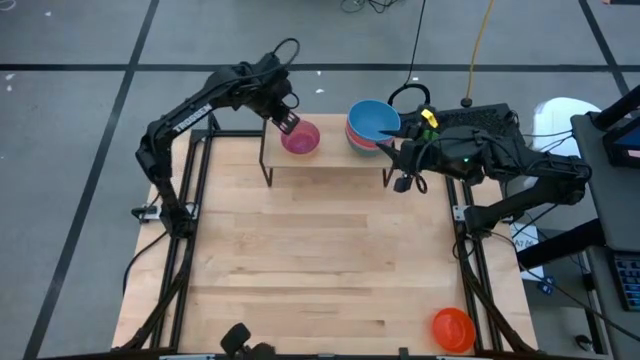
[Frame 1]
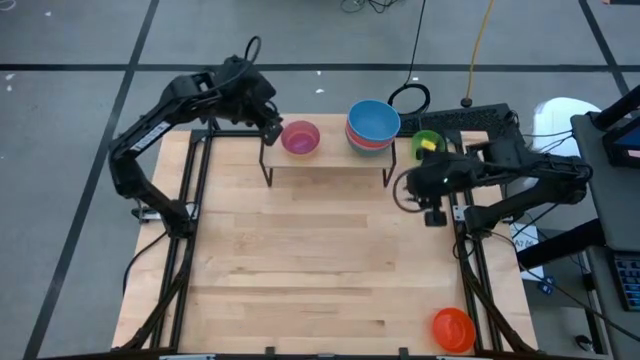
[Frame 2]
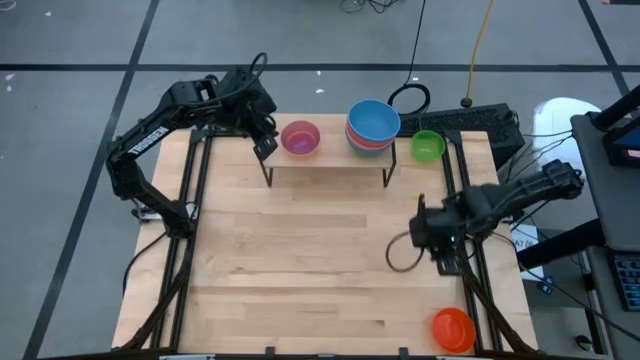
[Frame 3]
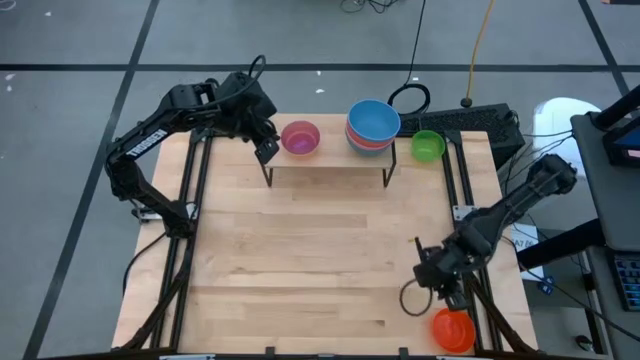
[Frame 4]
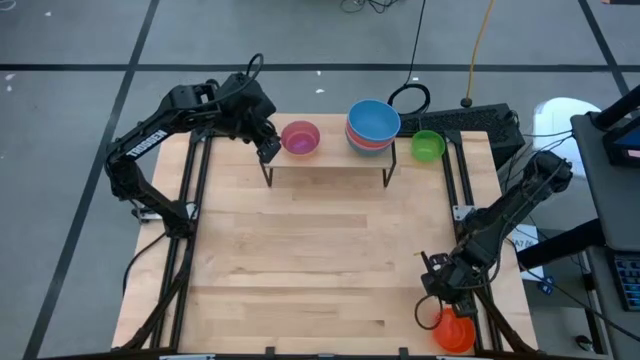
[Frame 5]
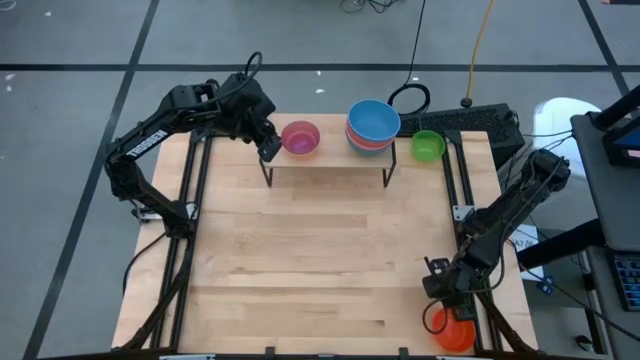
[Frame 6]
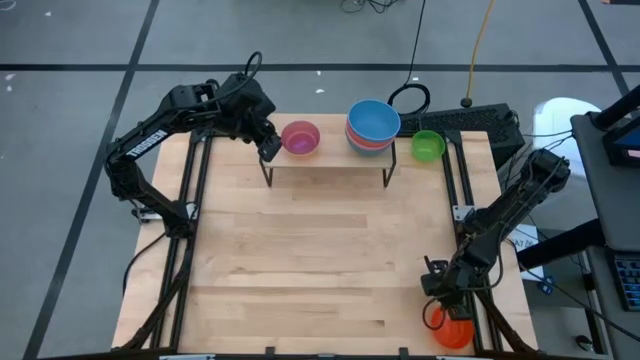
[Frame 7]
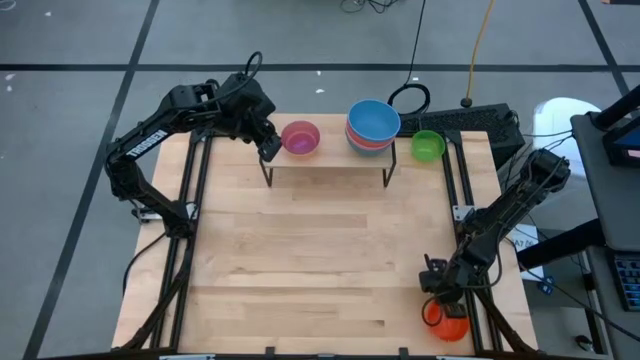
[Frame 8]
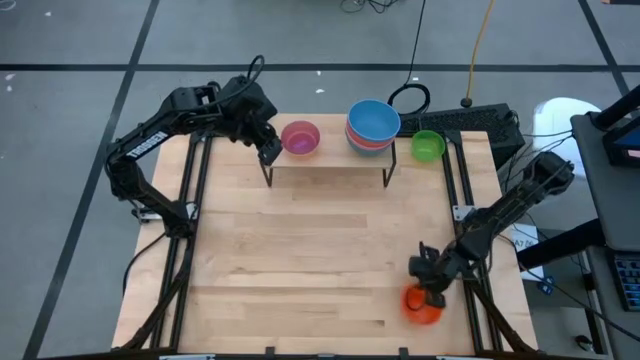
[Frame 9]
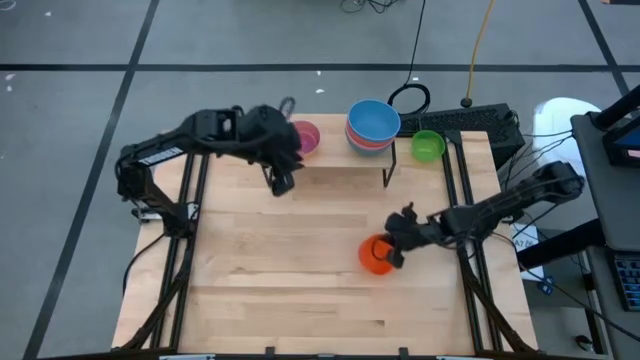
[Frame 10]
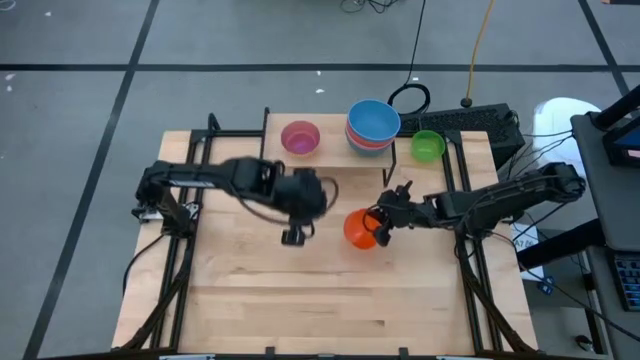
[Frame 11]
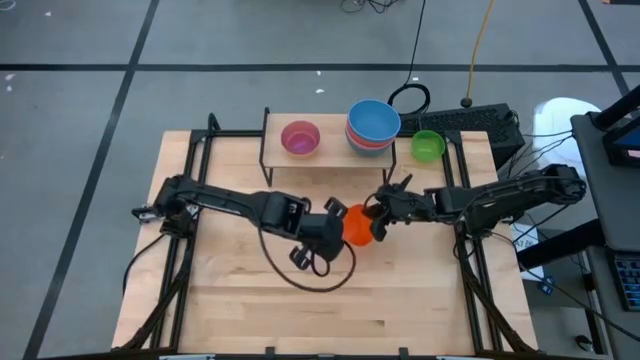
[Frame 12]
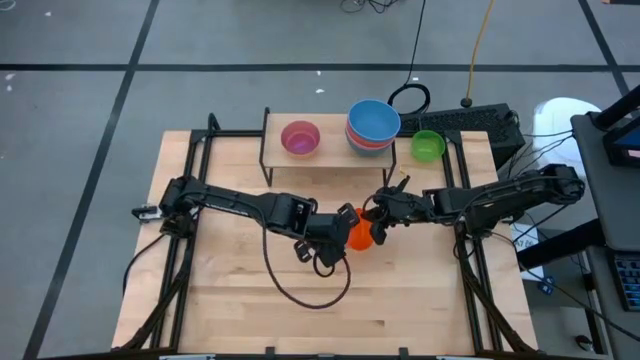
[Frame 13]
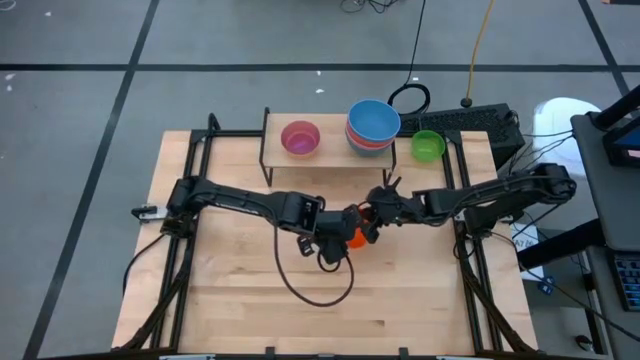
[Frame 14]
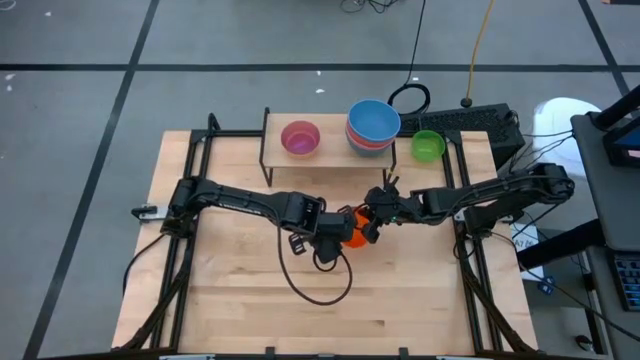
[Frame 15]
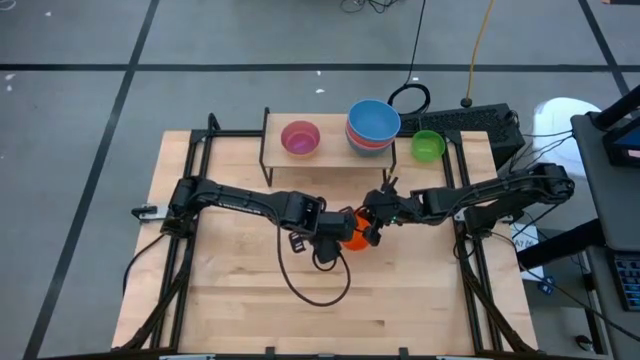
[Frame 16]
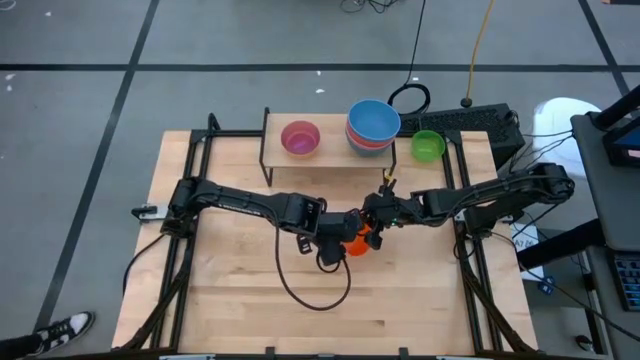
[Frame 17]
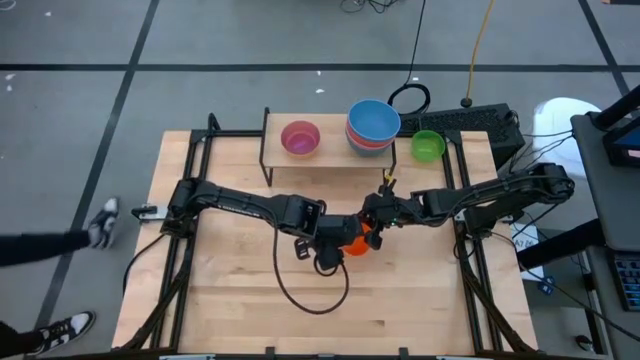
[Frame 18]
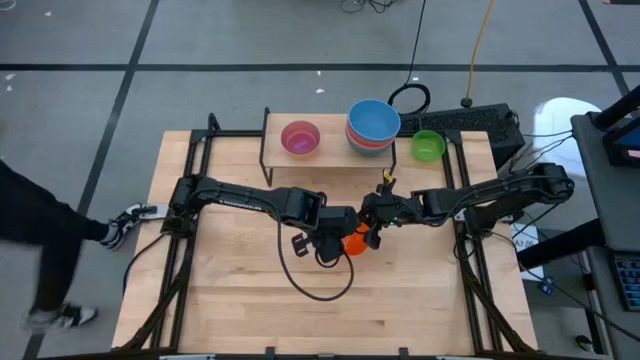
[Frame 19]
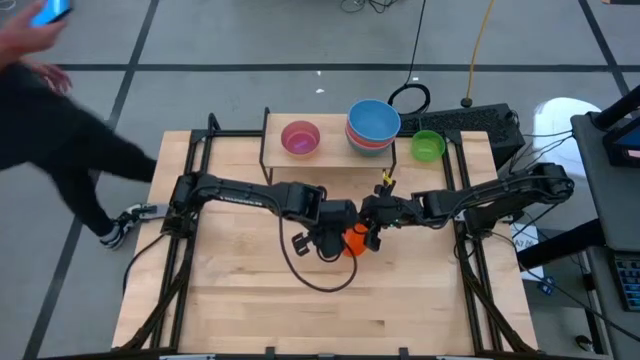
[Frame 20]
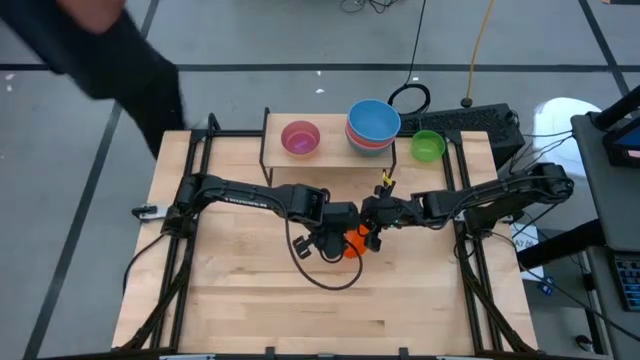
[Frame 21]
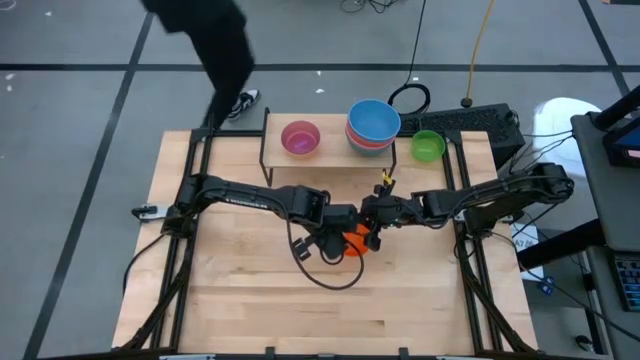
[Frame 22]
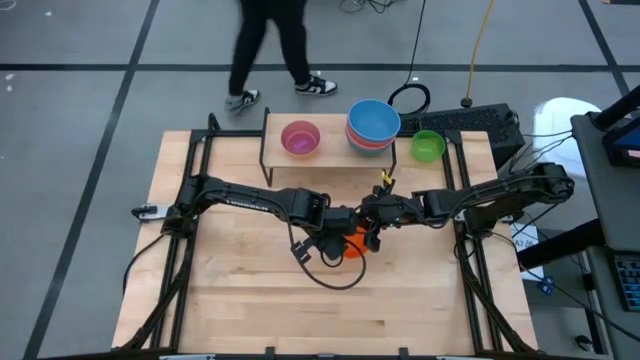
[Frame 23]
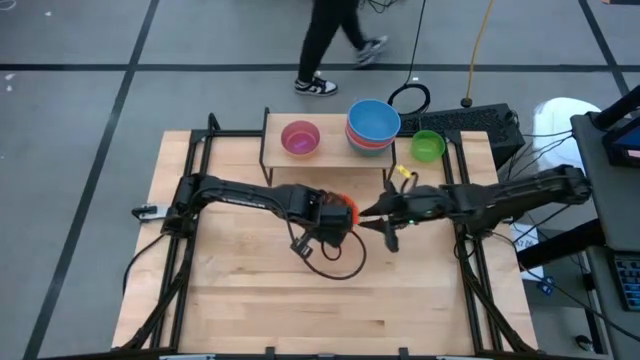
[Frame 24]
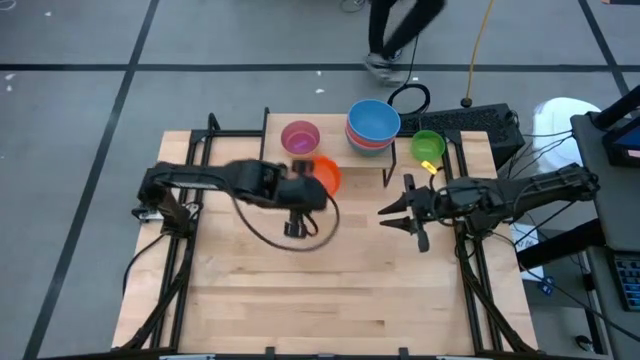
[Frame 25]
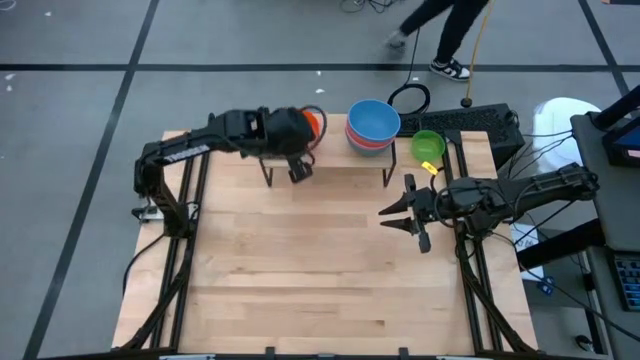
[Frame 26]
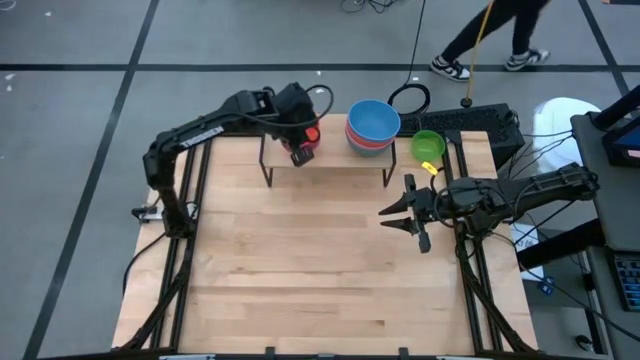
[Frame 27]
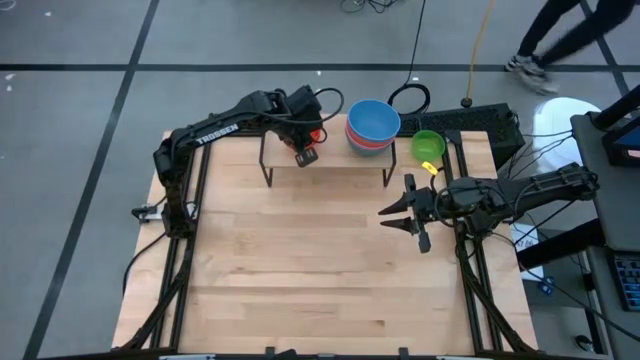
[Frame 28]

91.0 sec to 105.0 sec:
Task: Place and stack bowls onto a shelf
Stack the transparent orange bowl on top of the transparent violet bowl on the shelf
